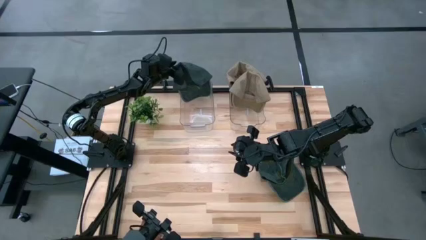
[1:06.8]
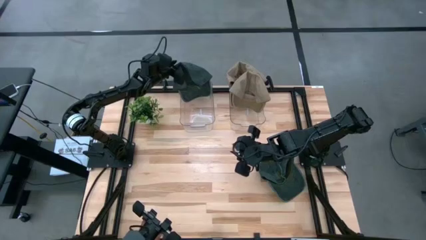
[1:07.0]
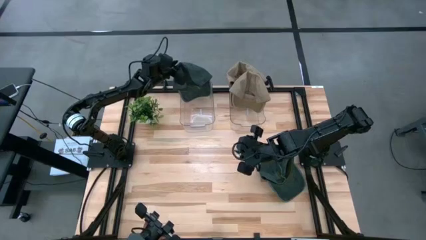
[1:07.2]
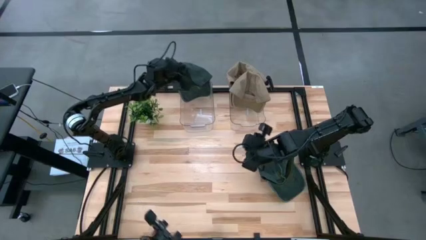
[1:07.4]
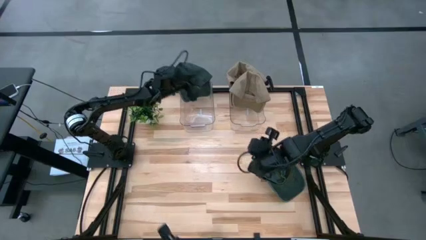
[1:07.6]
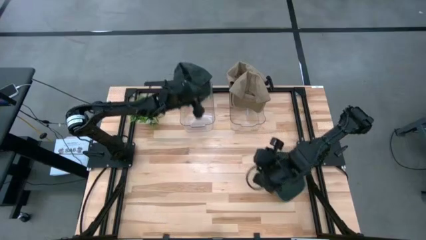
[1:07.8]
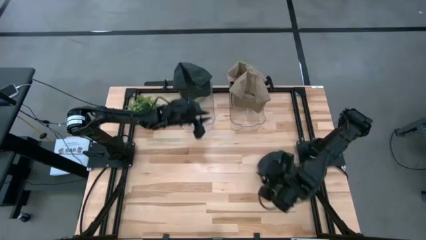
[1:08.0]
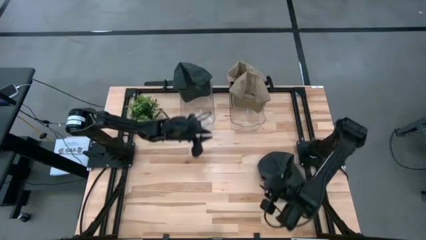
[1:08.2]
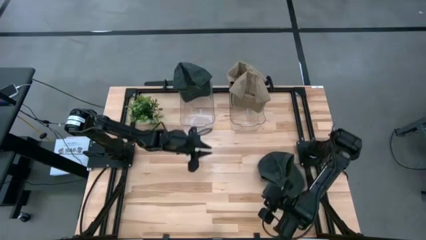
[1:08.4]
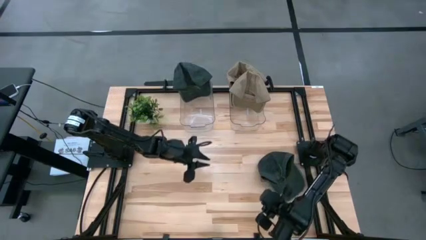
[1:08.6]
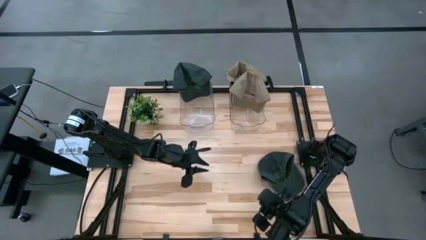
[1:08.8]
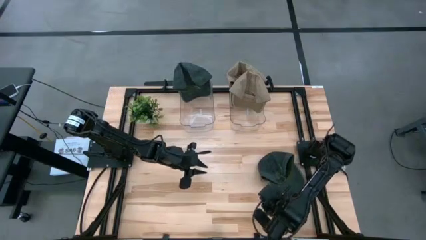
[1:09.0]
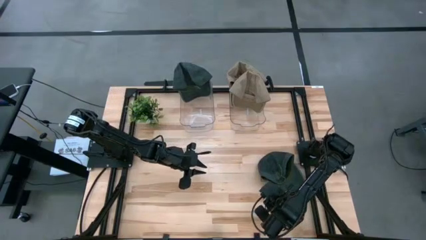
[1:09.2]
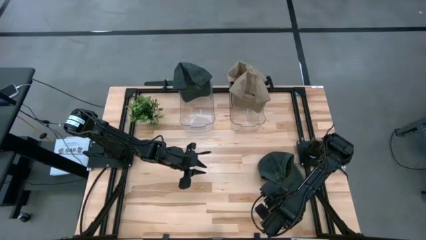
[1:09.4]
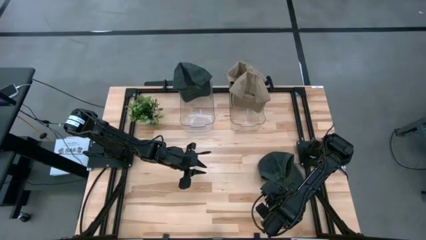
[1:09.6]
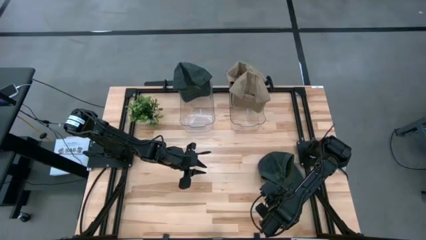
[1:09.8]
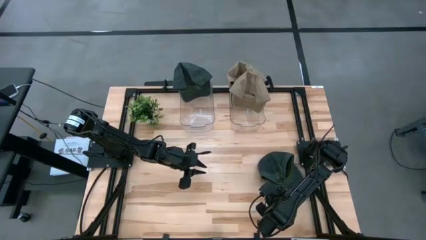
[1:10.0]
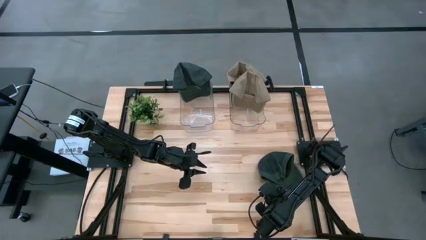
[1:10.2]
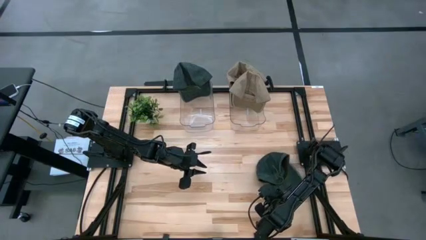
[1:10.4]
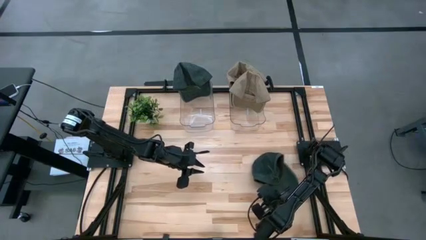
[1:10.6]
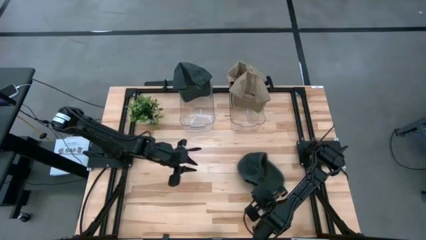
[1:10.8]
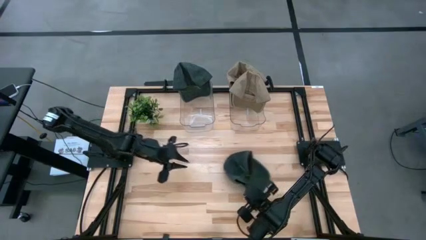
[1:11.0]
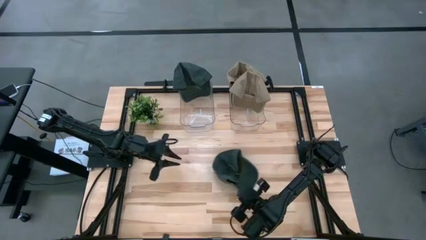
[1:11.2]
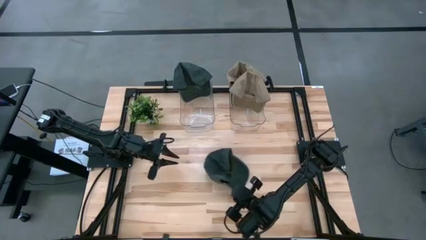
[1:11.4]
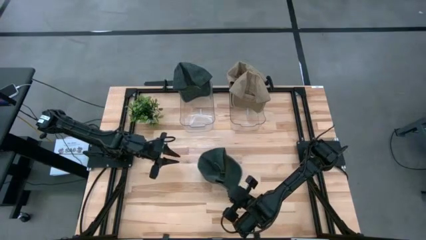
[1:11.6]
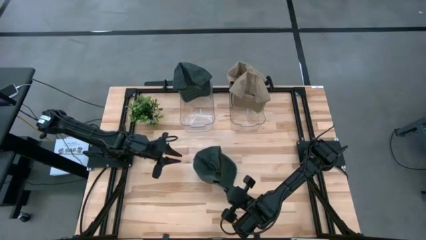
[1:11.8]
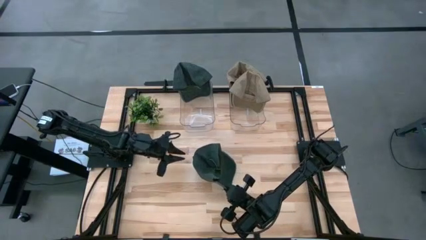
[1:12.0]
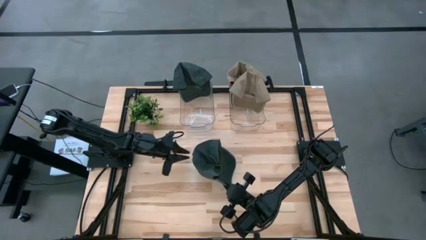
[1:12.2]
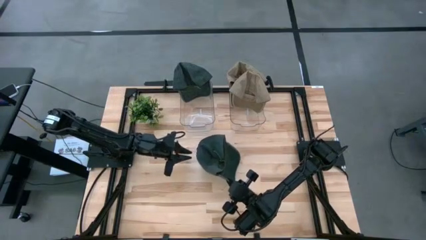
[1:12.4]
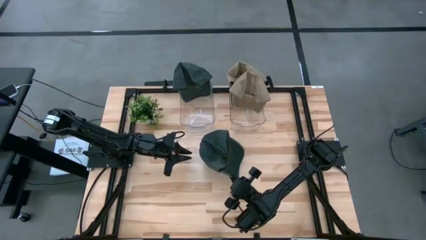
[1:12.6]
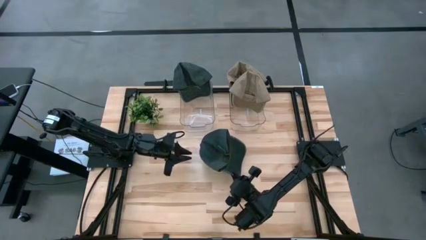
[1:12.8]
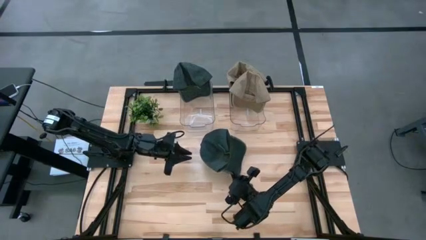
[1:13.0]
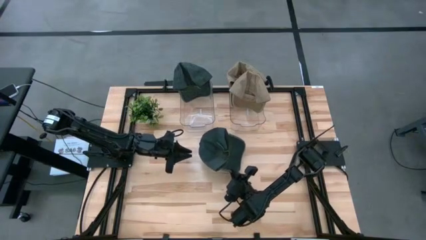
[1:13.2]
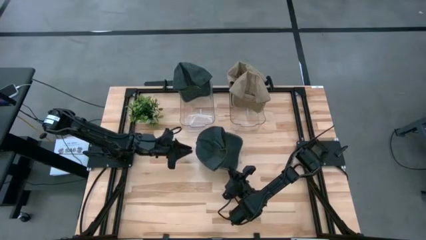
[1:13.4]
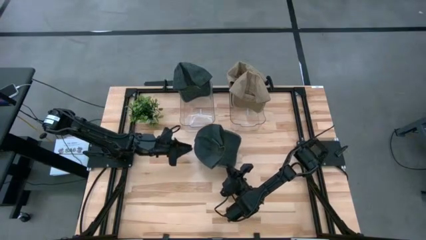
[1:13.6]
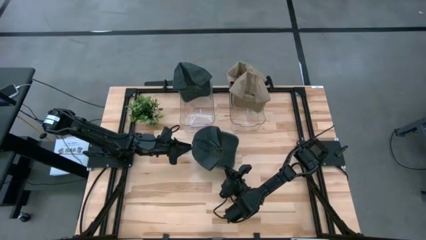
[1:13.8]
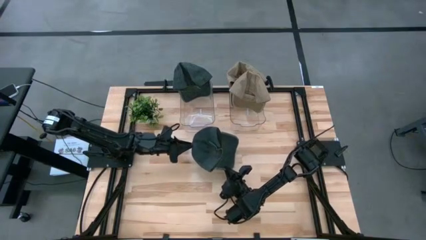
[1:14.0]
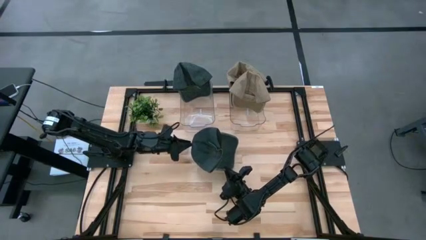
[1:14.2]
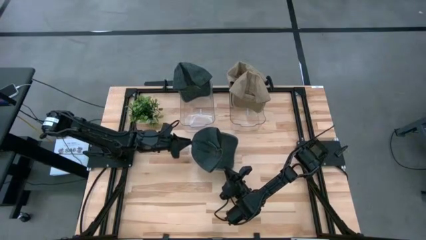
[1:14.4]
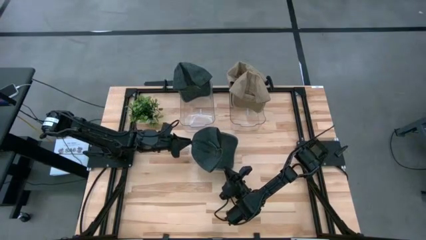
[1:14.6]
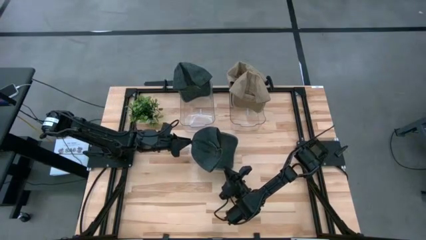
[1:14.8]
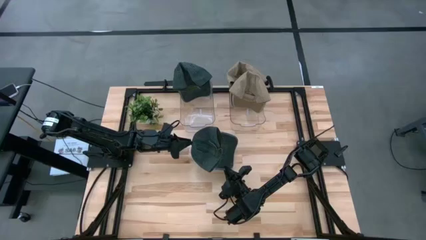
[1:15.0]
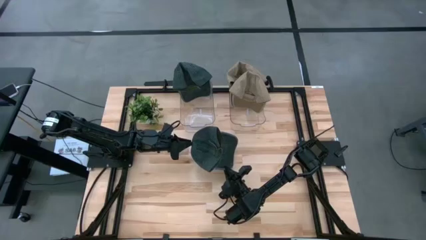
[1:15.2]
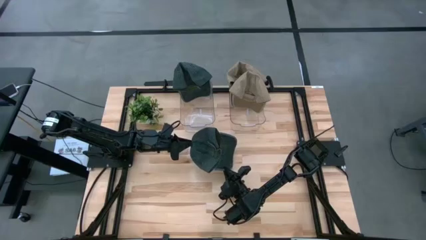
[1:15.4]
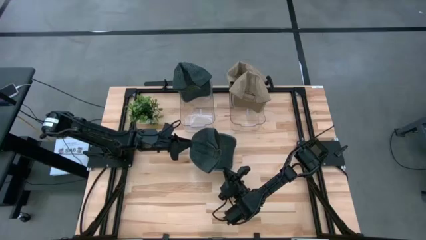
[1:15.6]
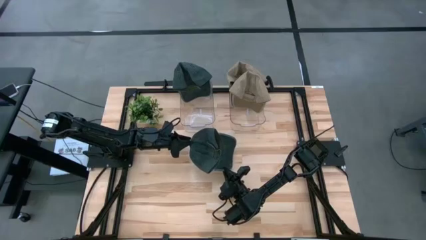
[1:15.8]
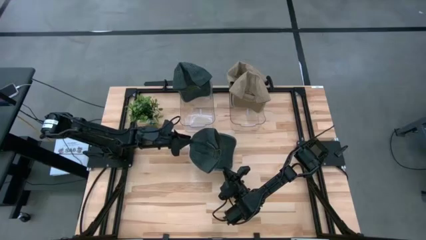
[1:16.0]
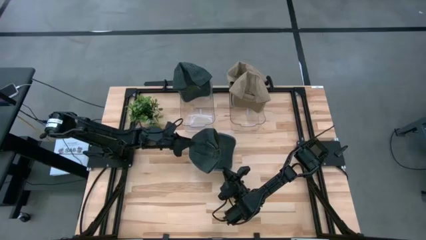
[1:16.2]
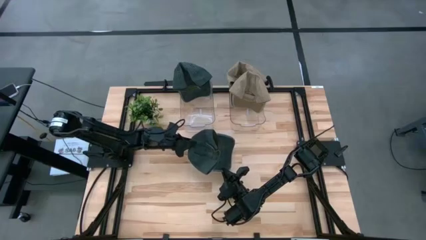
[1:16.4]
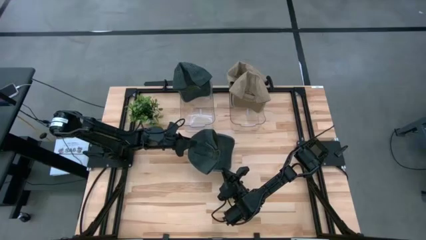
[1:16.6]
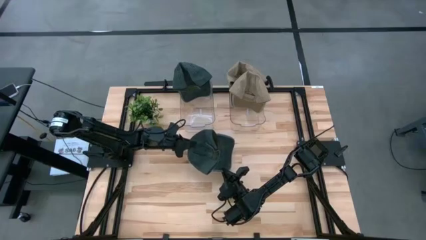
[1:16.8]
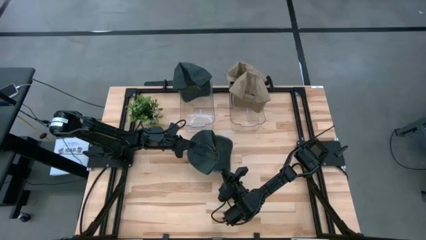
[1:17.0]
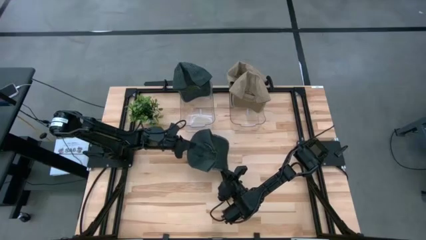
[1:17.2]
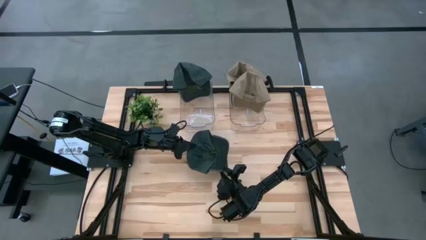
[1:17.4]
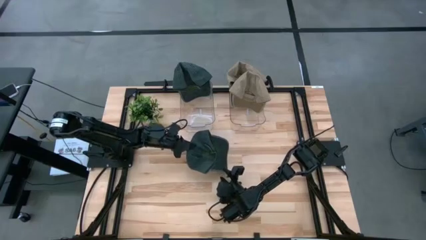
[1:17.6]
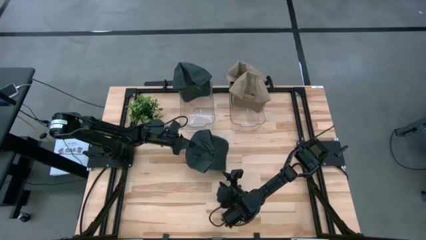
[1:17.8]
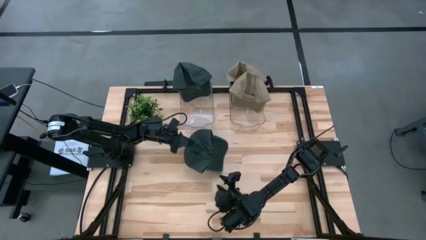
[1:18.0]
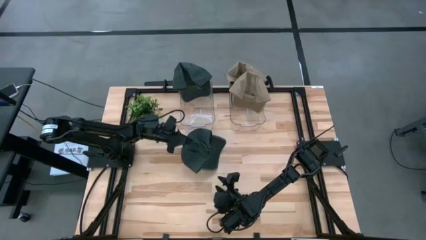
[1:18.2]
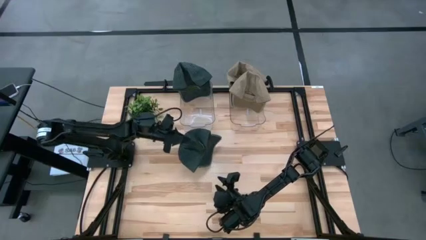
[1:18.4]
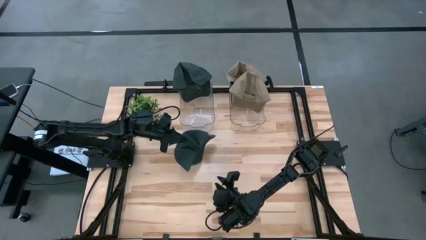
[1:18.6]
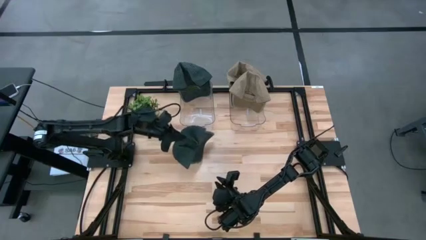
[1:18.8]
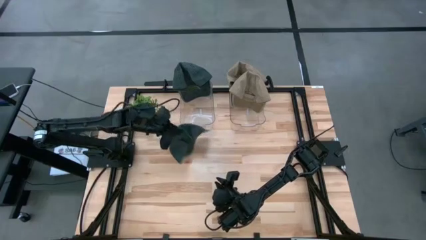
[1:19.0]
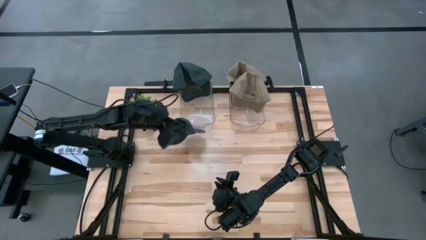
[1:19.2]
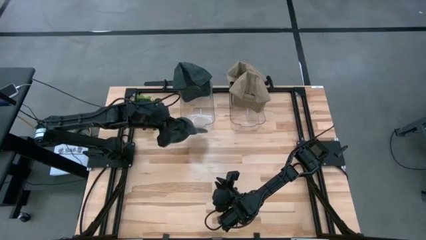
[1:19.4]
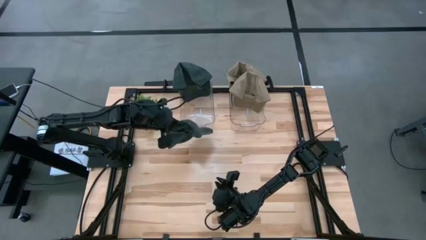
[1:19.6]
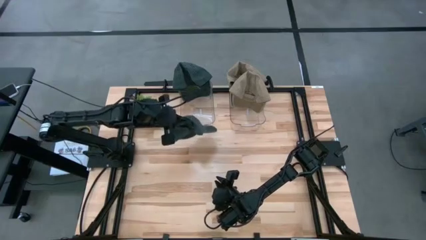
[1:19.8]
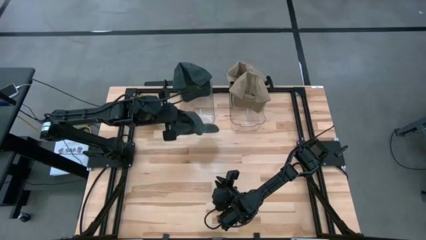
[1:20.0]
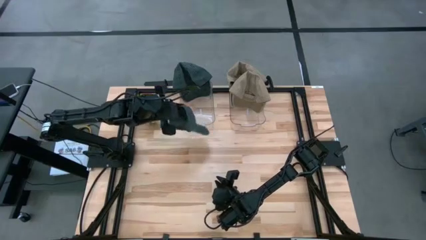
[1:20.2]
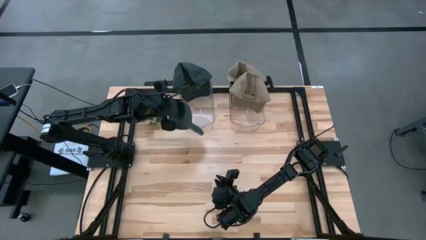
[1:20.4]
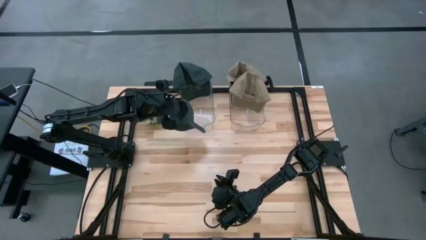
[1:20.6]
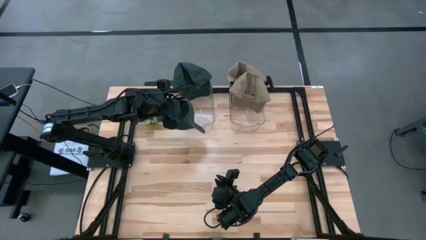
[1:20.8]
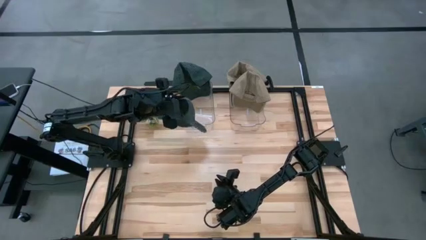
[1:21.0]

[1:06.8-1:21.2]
Task: Pick & Place hat
Put the black cap into the left transparent bin
